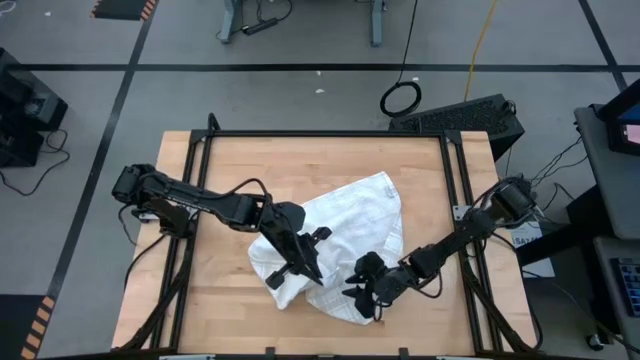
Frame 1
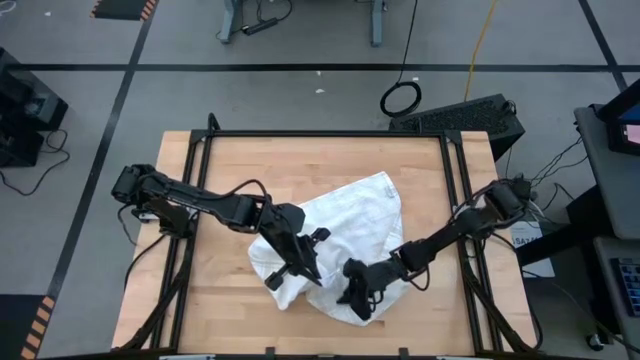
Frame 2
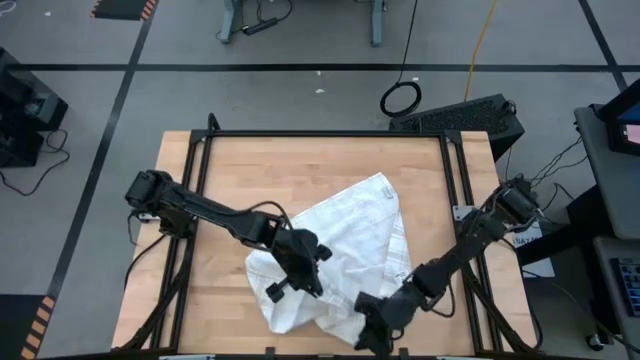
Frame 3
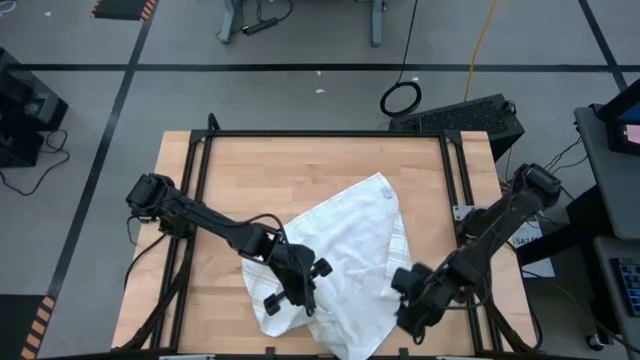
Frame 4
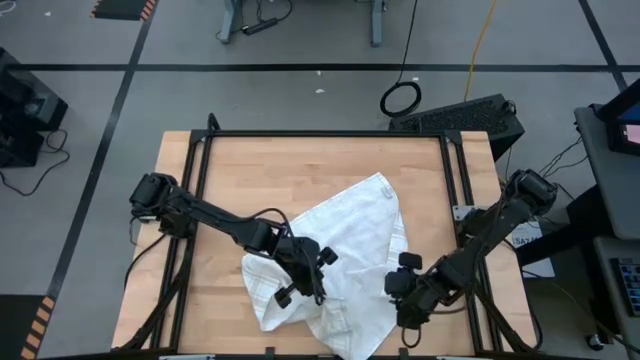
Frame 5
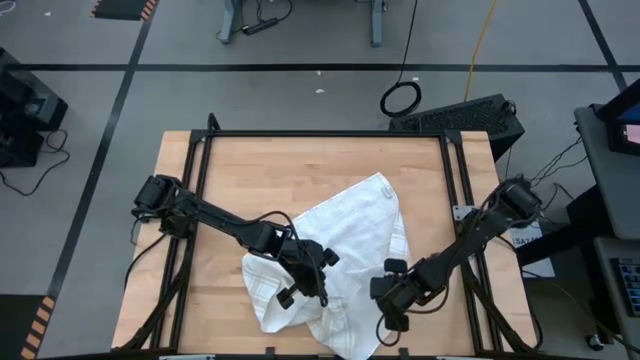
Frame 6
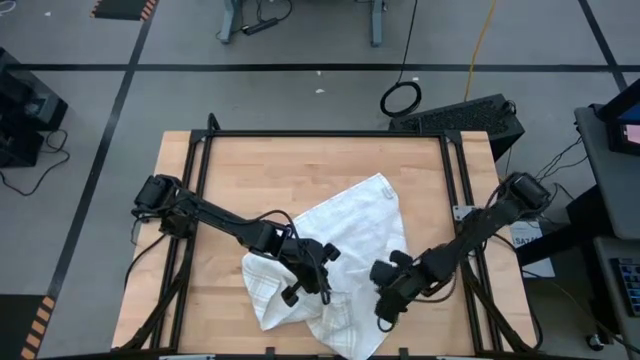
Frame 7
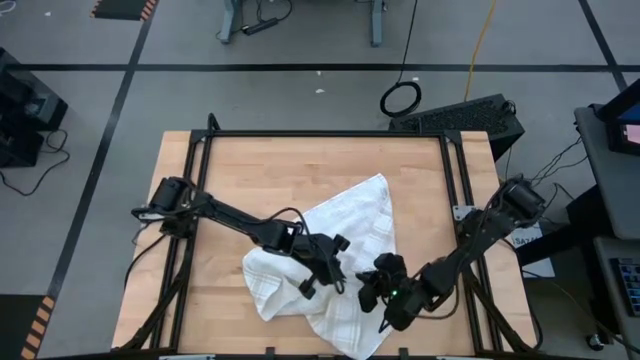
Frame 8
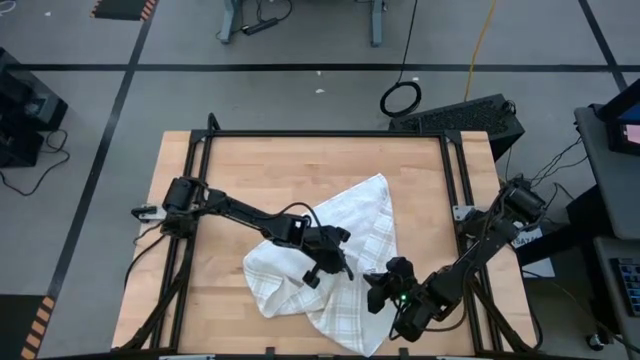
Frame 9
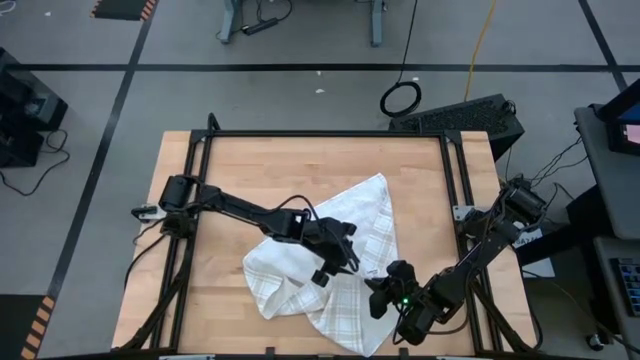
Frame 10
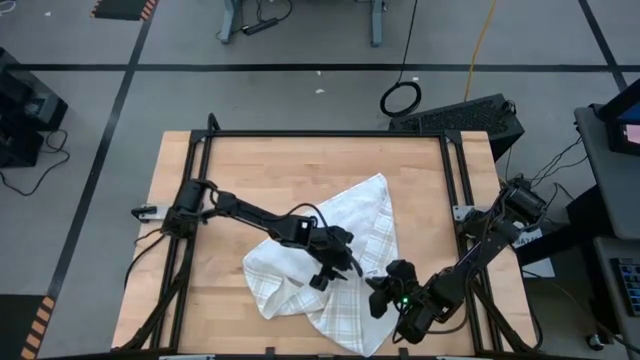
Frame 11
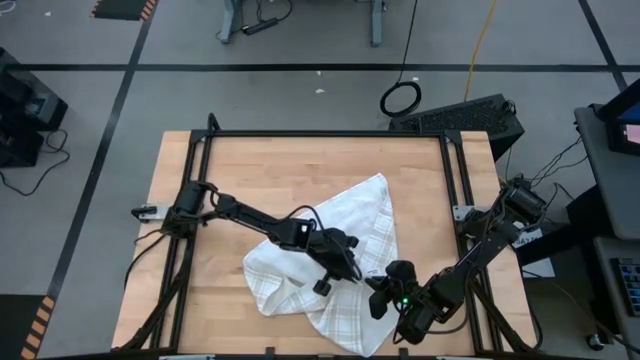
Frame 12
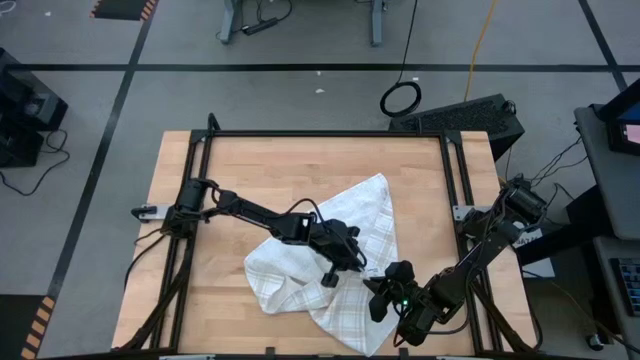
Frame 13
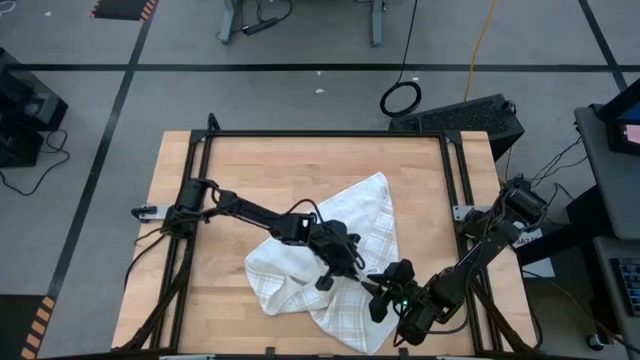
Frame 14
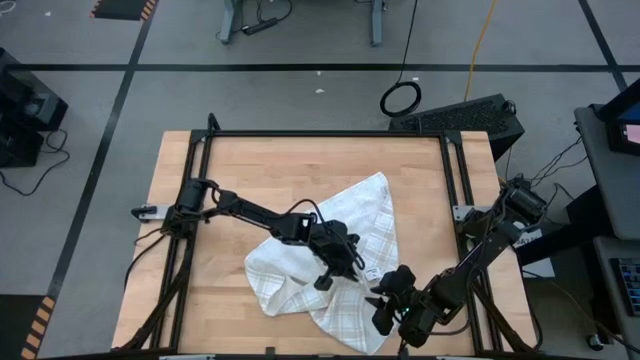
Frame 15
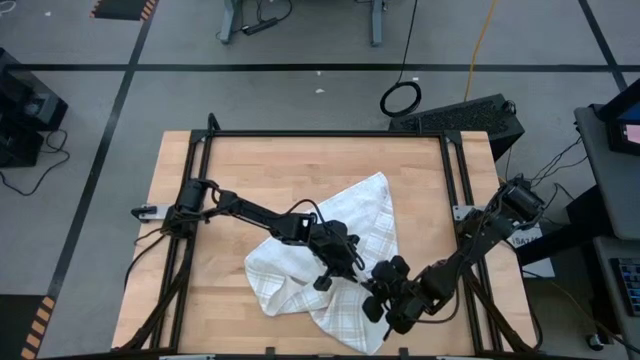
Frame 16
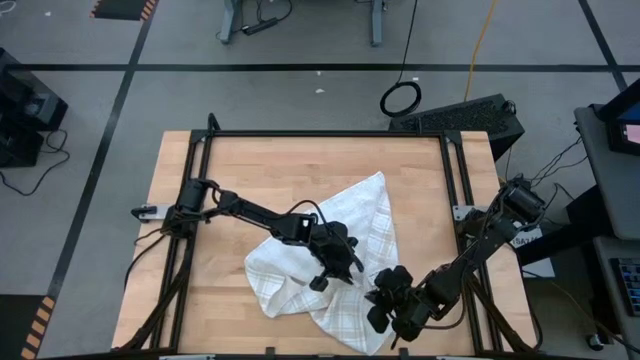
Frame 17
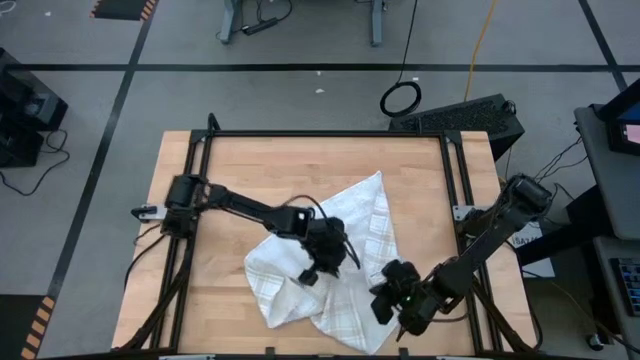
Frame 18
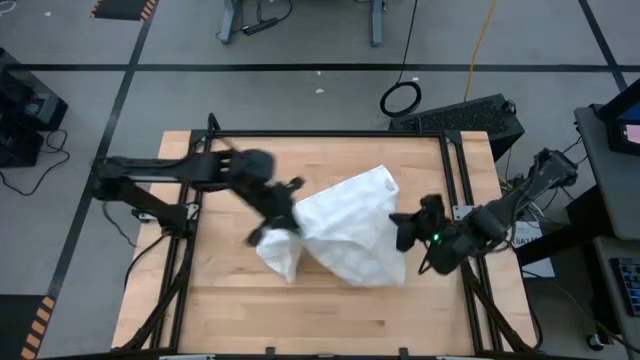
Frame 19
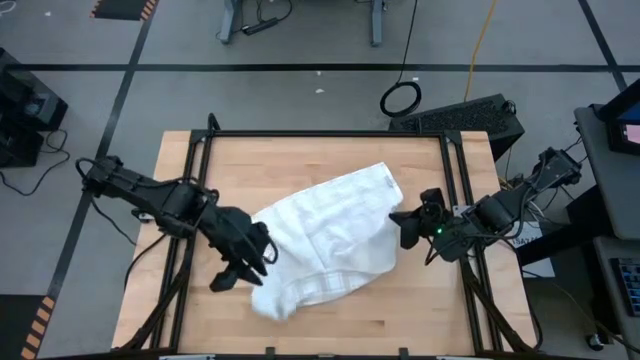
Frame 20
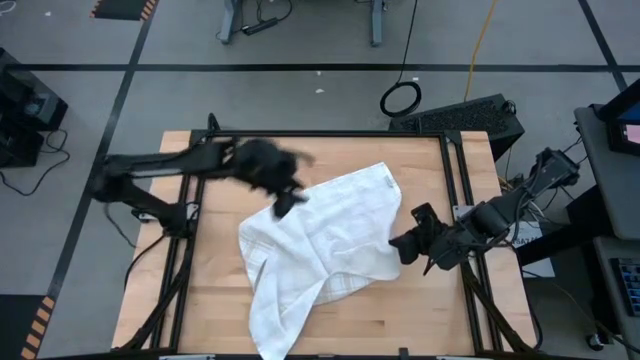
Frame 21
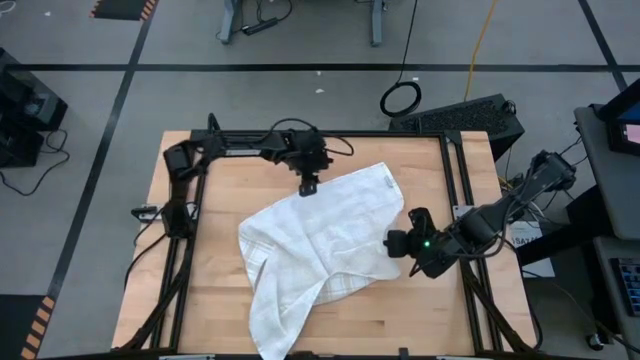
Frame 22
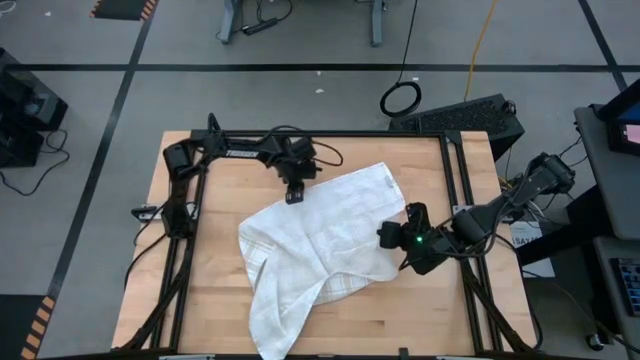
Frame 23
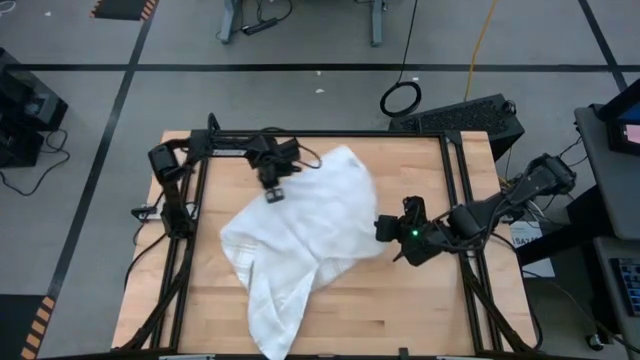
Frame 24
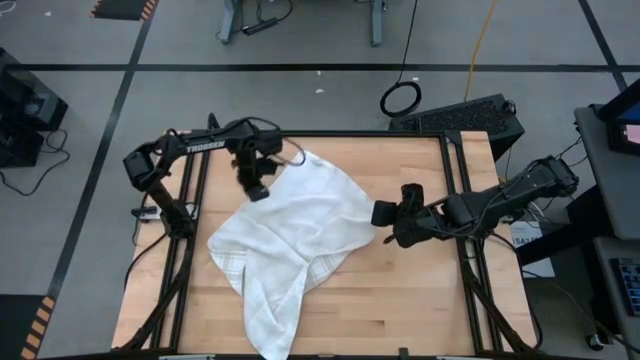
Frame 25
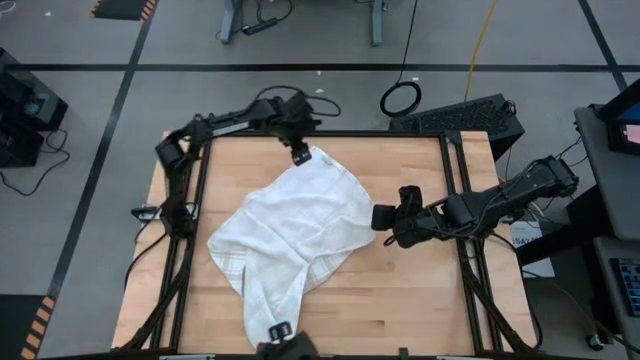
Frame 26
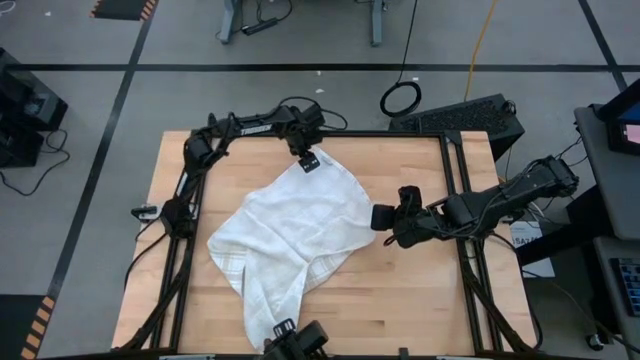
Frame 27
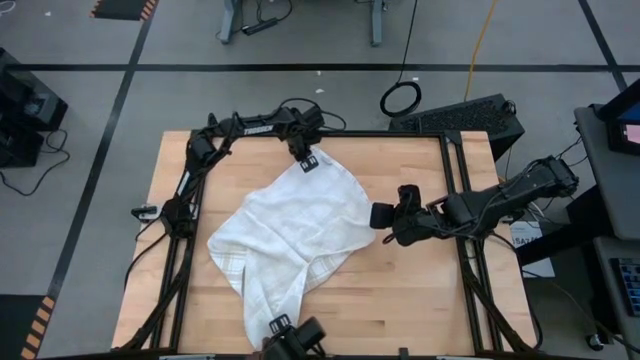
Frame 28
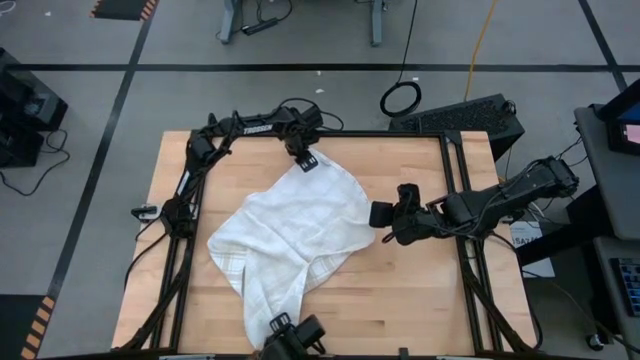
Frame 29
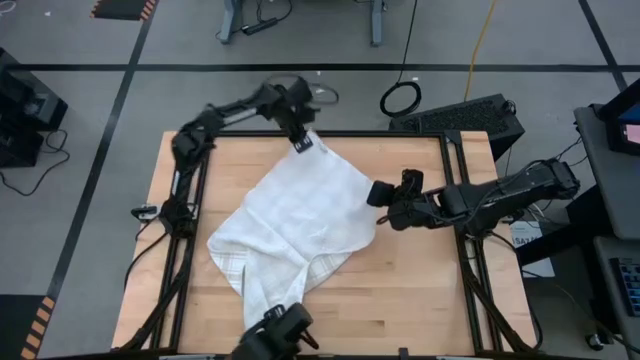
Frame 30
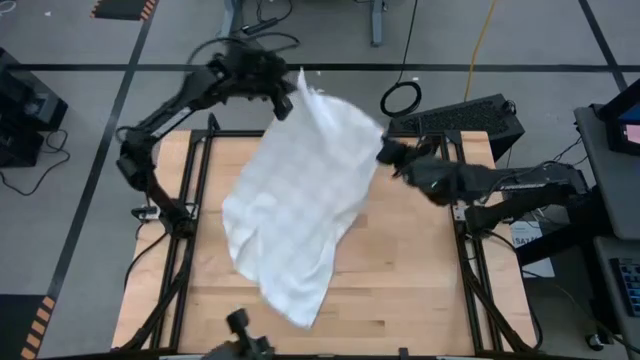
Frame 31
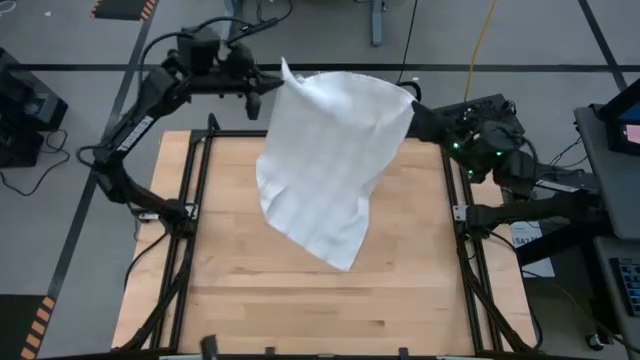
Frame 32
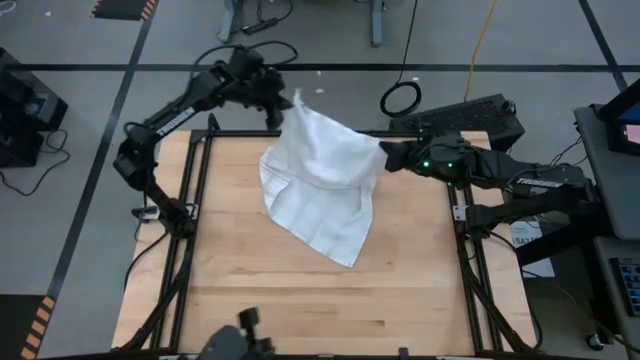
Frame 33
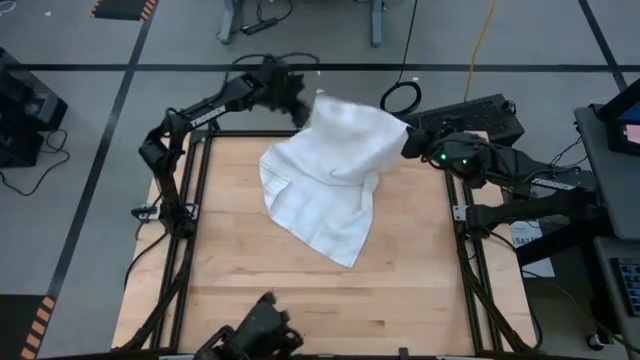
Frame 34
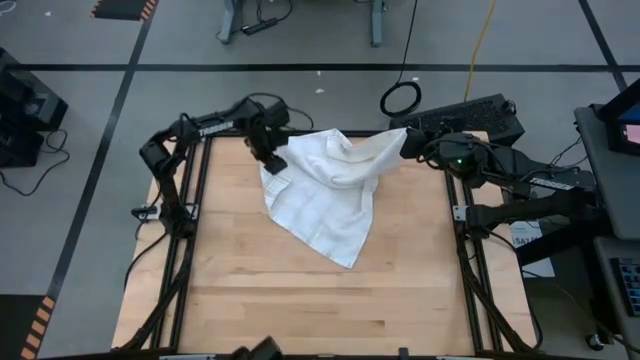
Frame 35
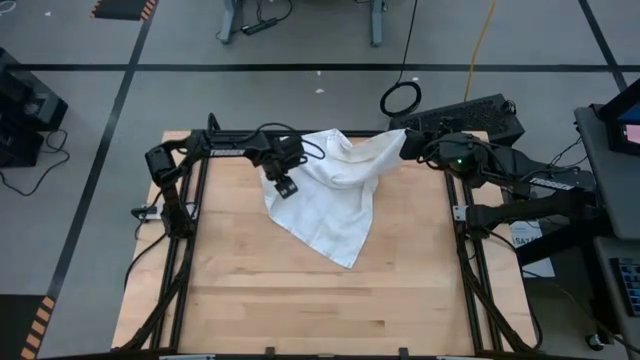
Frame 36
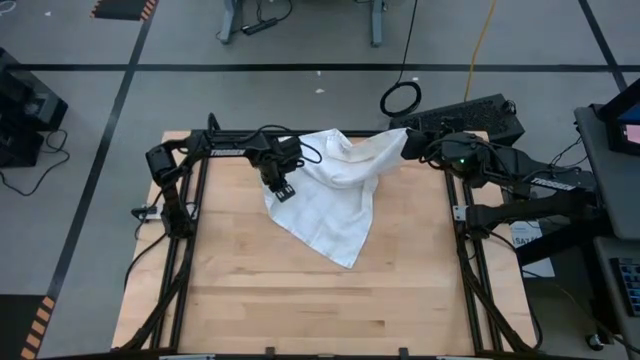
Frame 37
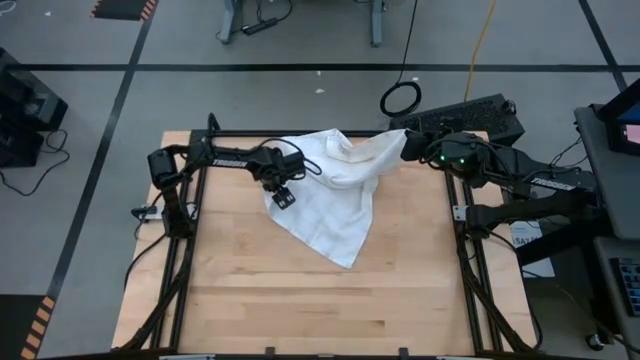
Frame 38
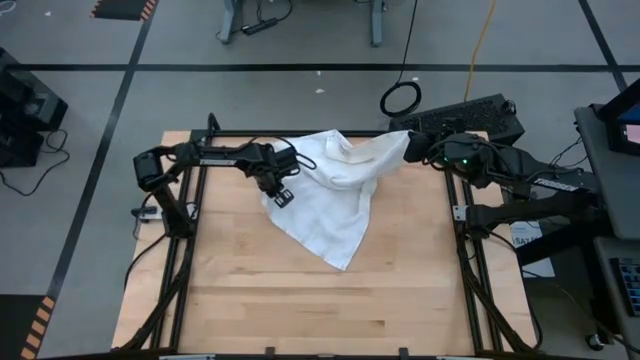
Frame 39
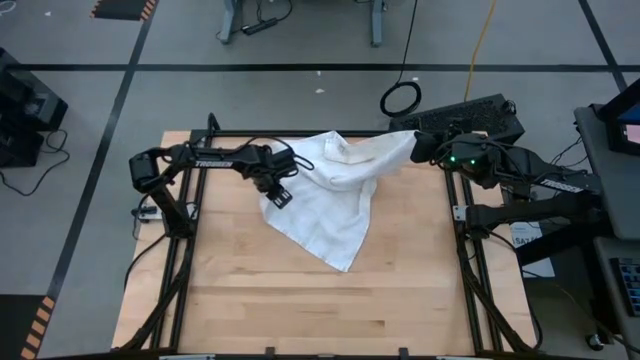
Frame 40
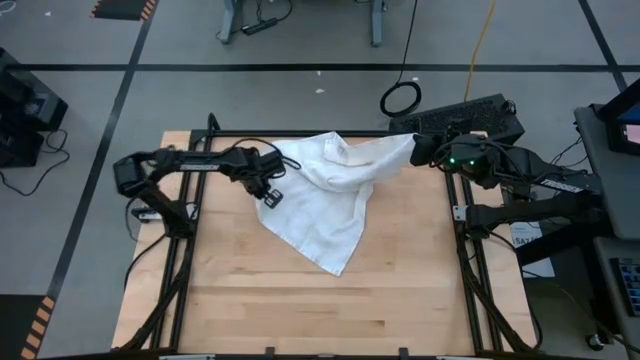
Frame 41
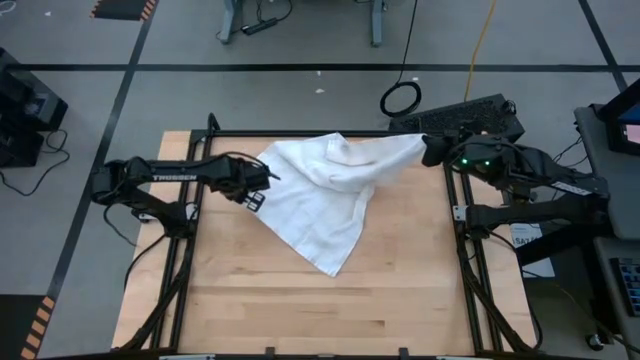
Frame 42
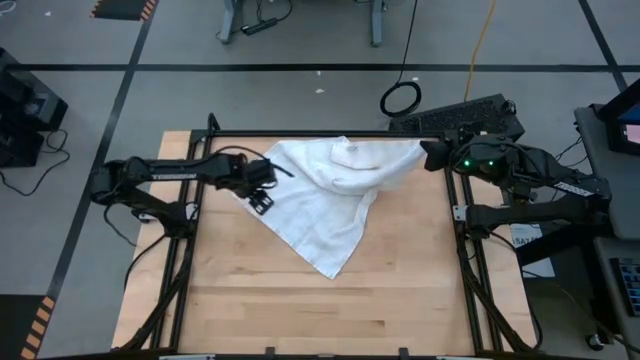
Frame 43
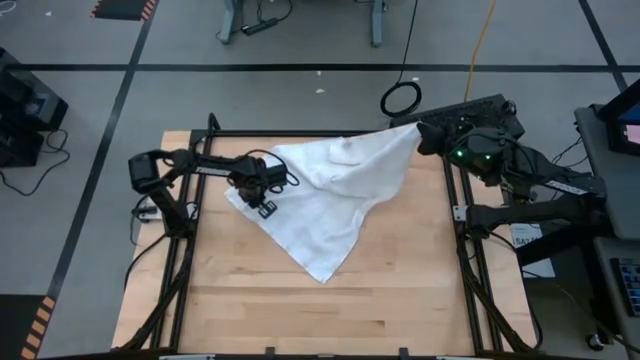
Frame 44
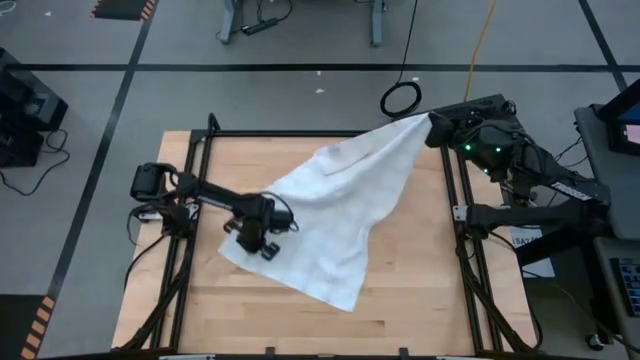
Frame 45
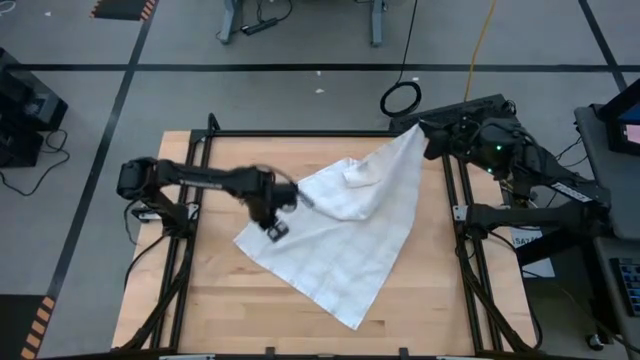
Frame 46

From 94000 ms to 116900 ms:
Task: Roll towel
Roll the towel
